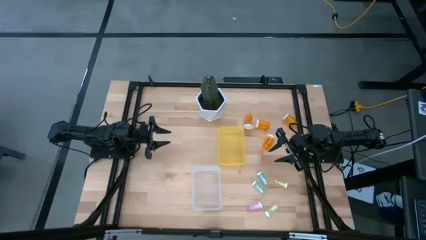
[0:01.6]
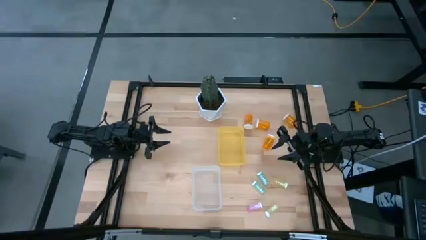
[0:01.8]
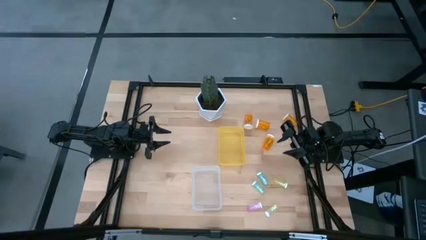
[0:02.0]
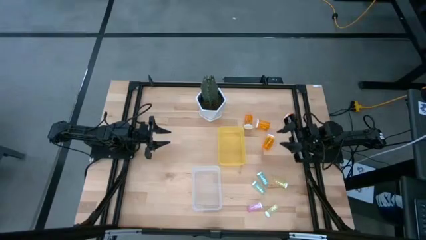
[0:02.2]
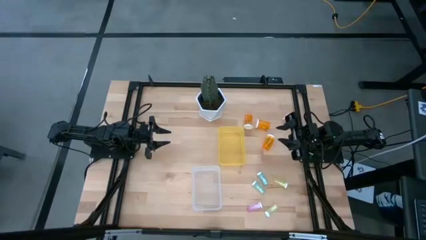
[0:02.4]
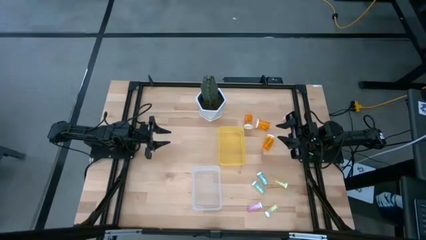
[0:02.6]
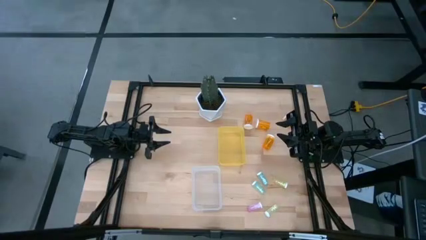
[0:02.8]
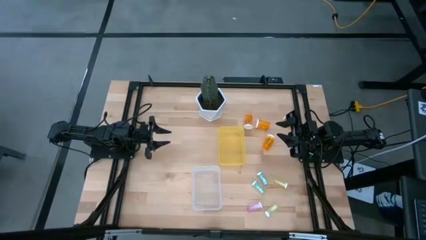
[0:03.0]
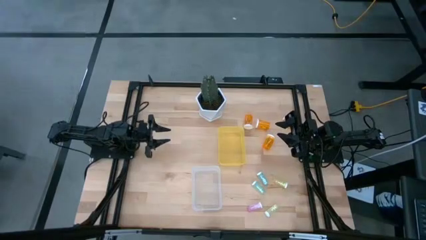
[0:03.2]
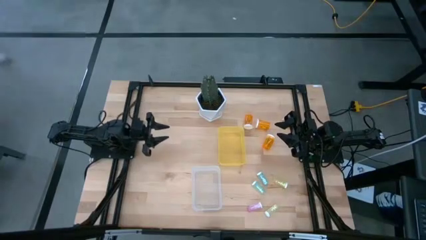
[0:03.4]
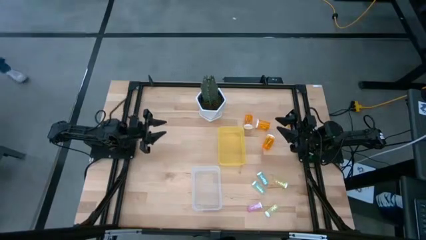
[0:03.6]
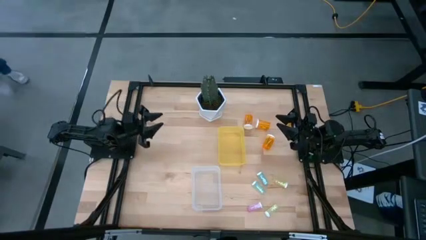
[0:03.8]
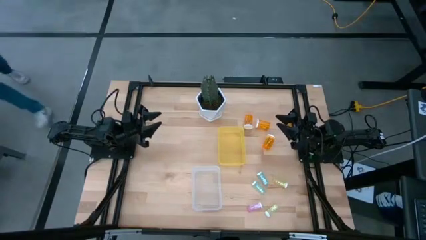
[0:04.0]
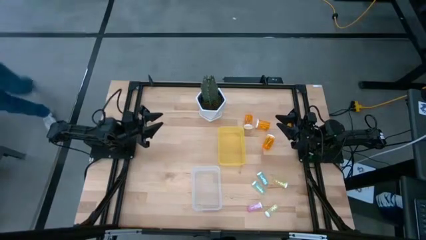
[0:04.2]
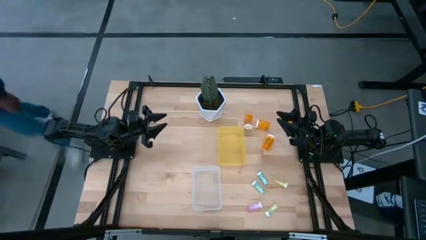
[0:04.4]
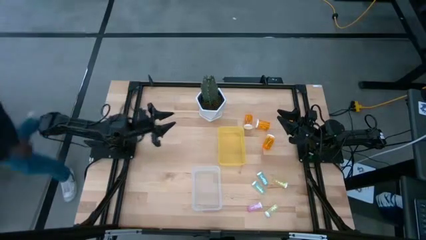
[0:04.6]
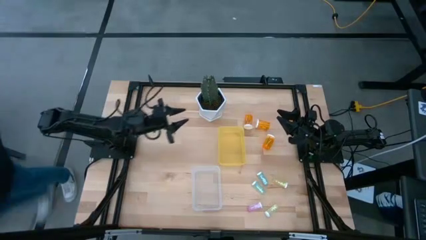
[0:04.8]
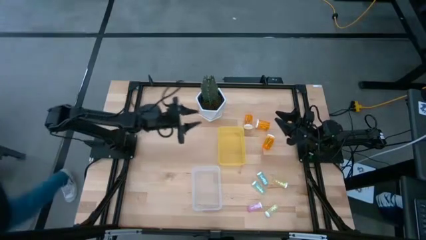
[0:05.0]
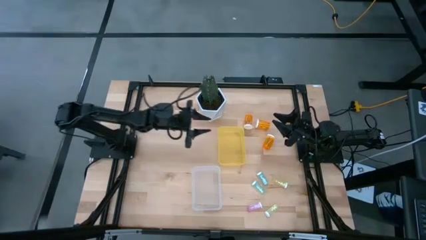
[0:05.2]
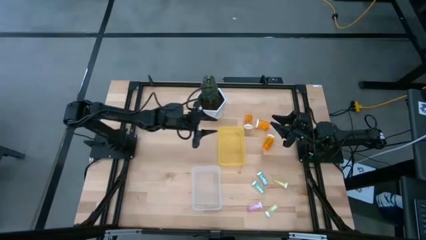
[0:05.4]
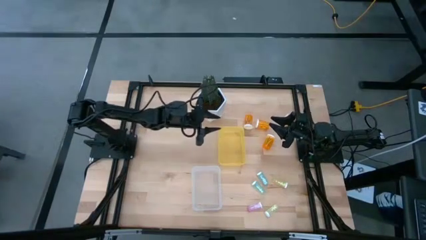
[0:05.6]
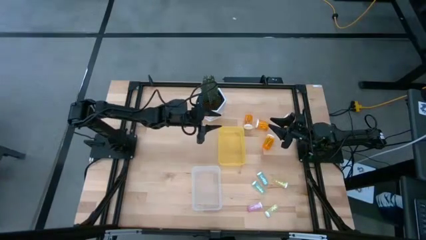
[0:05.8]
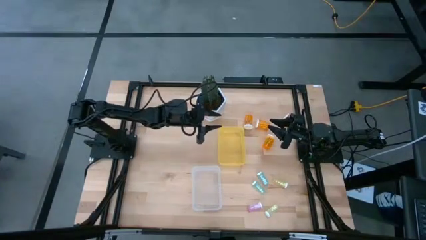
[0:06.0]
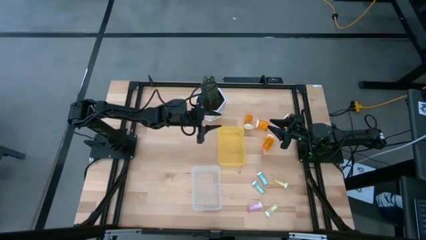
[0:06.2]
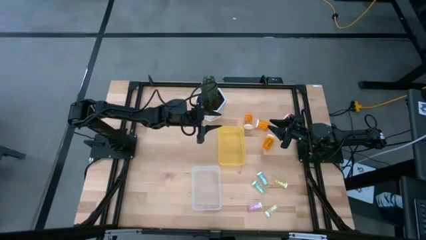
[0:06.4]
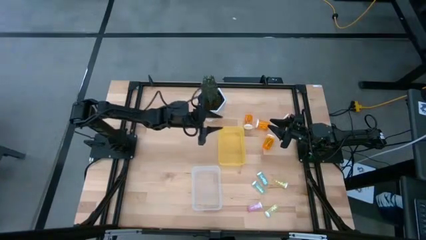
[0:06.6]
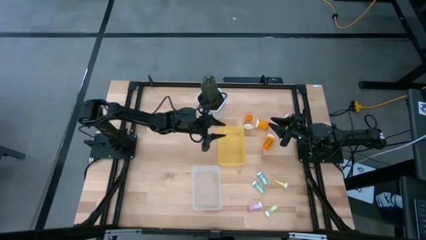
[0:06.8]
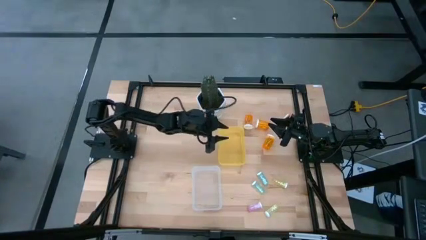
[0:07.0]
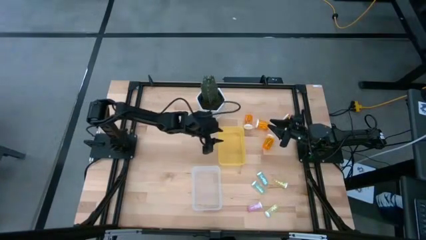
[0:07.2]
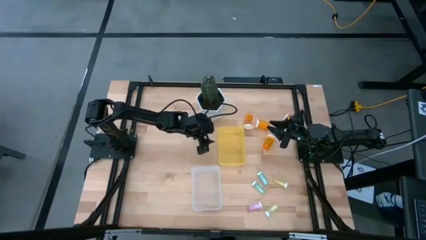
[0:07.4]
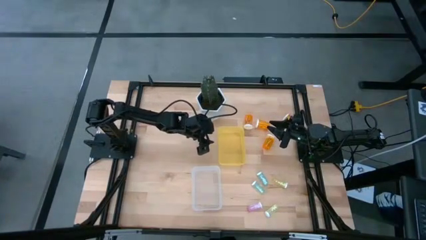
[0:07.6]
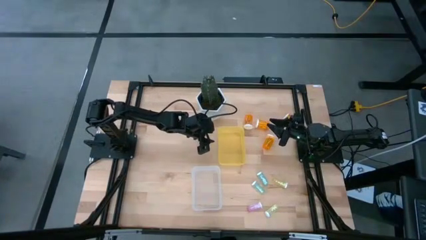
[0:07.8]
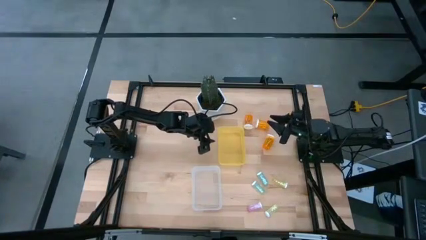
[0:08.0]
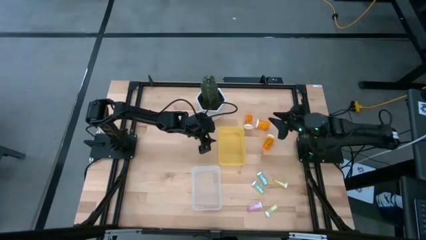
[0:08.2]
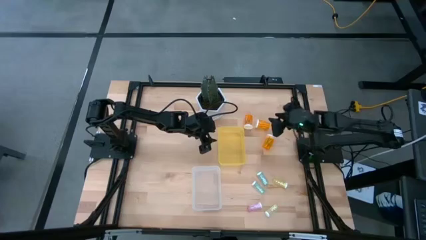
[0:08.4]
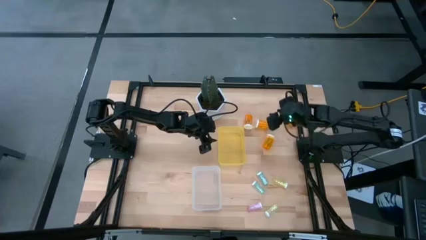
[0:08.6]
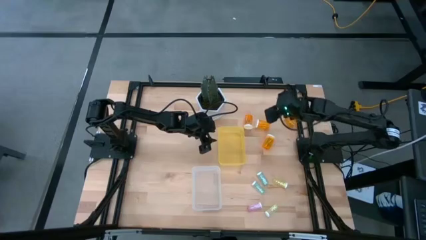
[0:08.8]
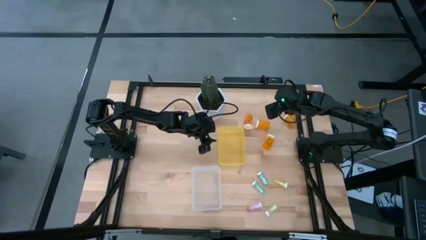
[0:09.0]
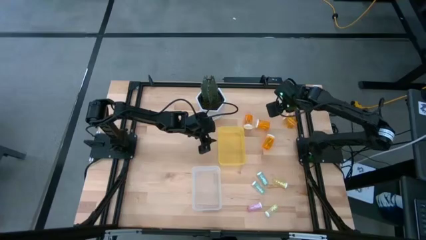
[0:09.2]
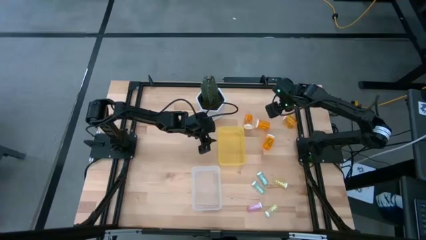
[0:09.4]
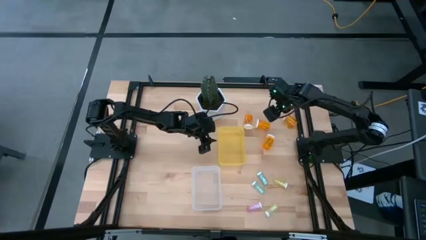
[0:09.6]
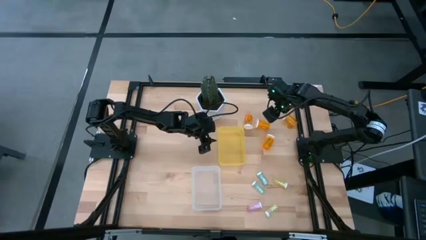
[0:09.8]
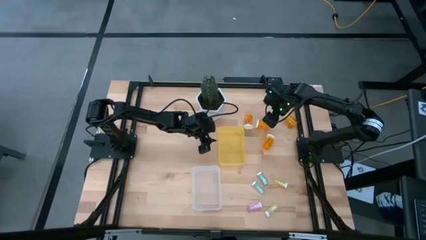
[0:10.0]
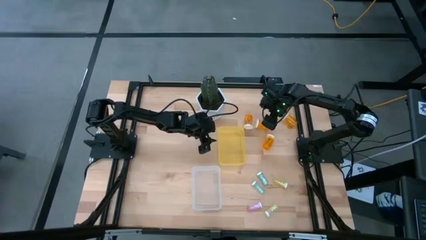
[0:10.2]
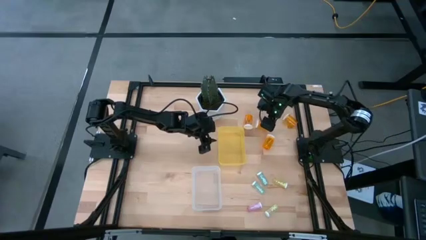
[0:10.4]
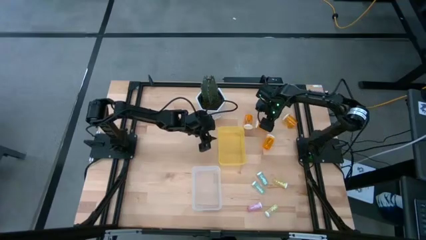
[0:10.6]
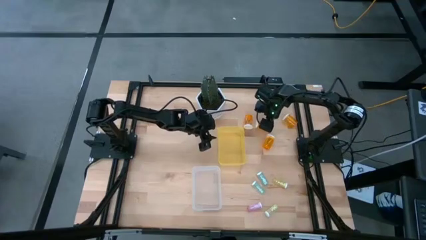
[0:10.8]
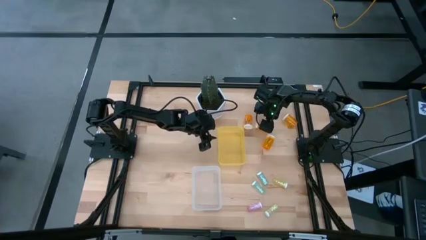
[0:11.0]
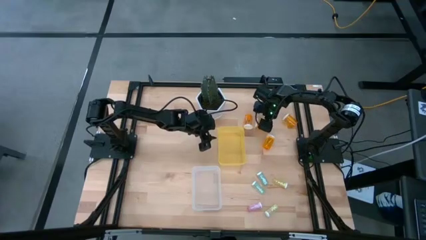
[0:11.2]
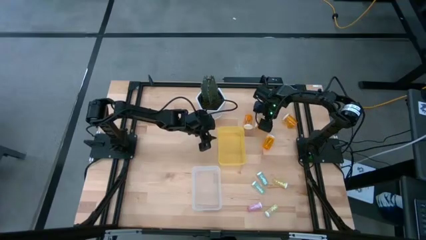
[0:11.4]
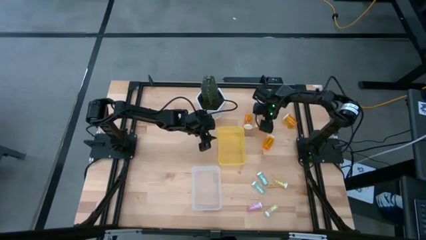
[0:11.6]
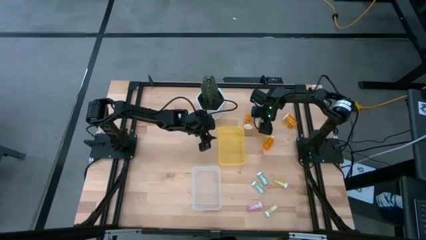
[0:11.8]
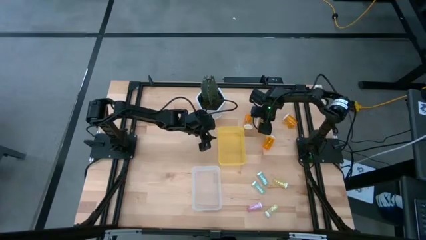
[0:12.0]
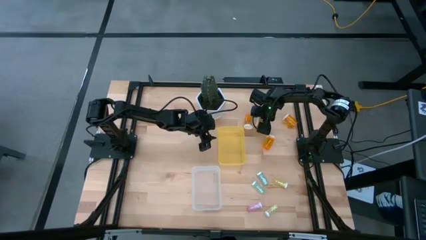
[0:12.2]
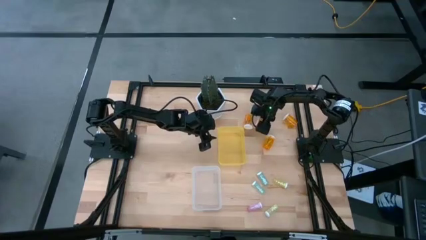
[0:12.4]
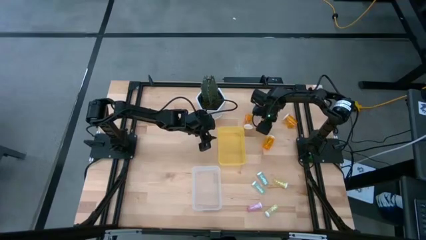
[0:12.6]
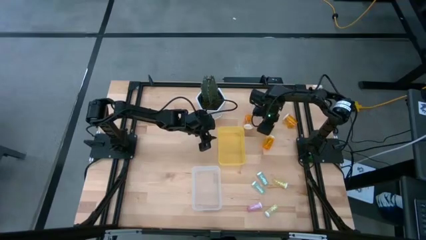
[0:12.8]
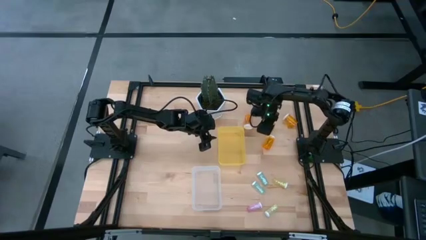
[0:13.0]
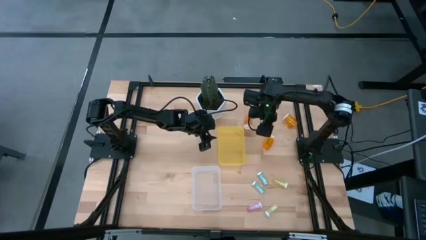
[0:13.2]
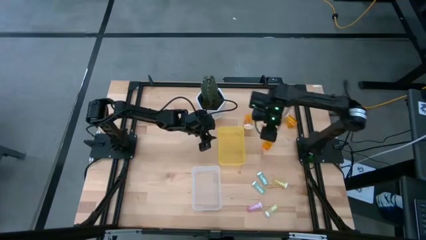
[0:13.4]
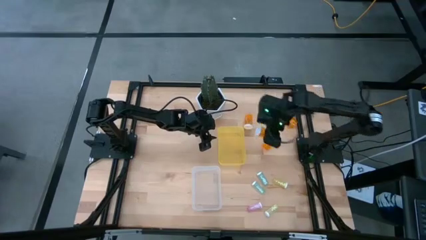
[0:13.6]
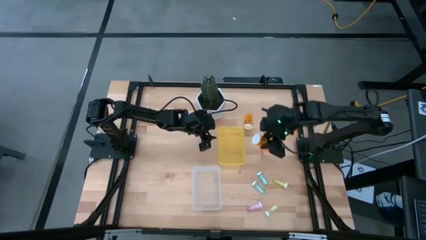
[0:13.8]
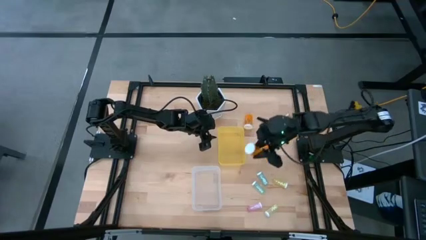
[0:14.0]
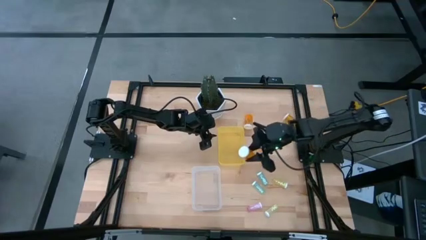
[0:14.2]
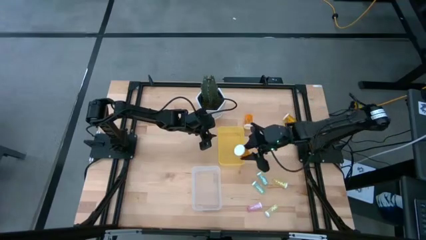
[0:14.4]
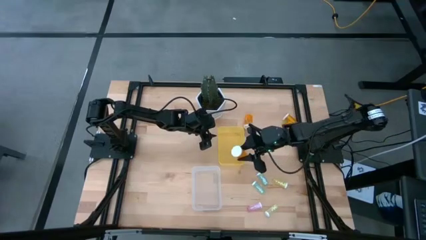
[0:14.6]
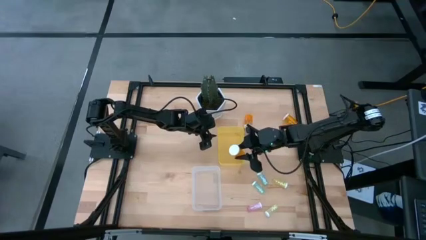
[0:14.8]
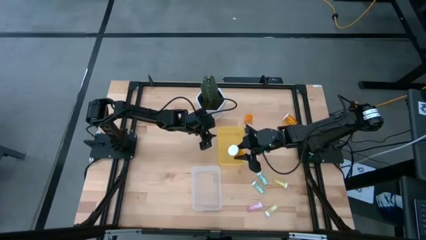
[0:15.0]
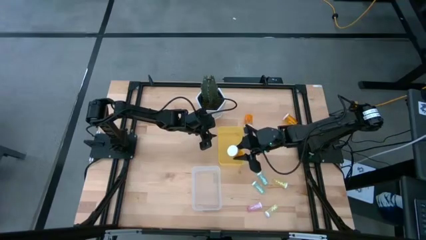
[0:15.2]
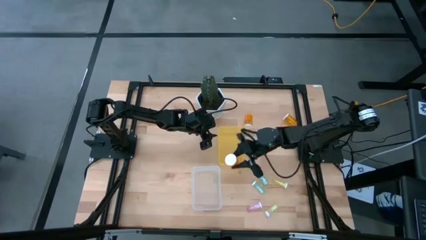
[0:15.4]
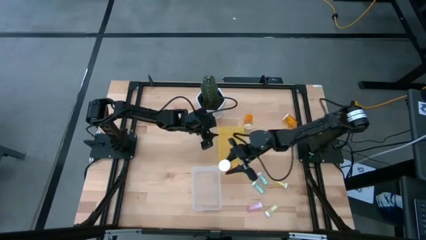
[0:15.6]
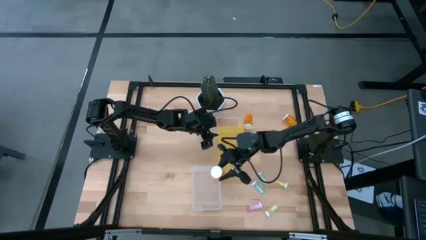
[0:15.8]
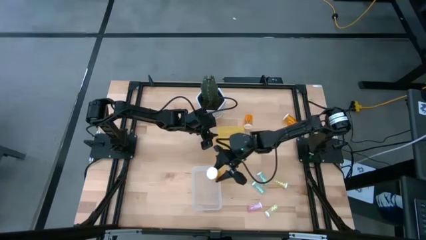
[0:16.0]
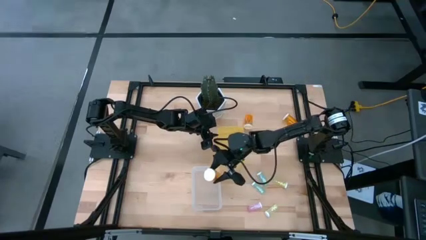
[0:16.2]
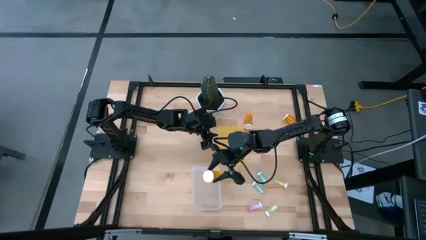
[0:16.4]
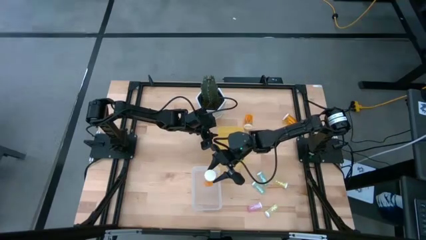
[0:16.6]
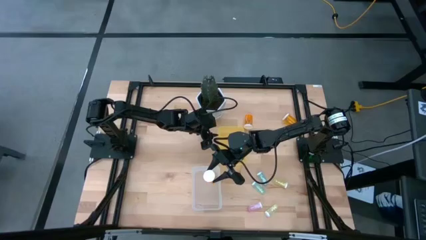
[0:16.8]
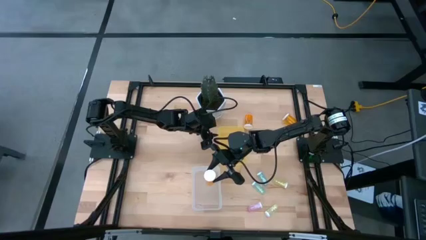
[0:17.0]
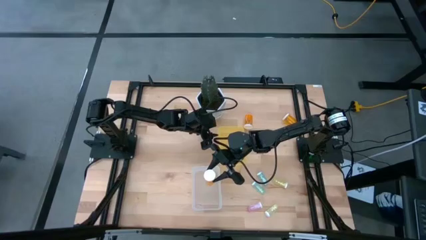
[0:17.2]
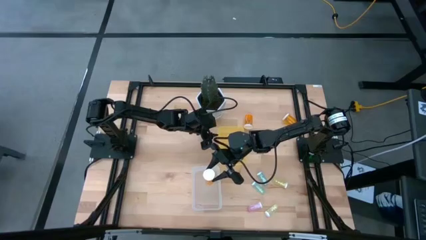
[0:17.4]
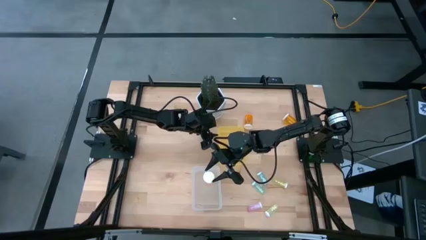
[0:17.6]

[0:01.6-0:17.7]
Task: Pick and place medicine bottles into bin by pill shape (circle, oval)
Put the large orange pill bottle into the transparent bin
